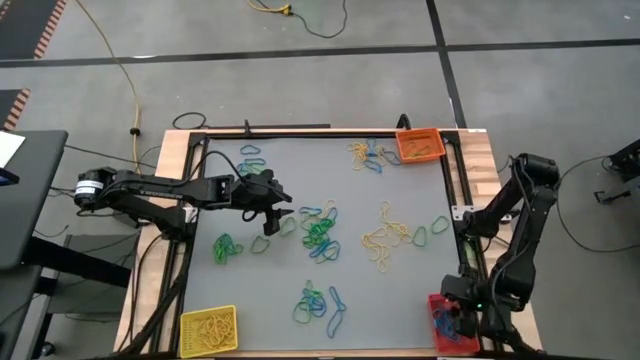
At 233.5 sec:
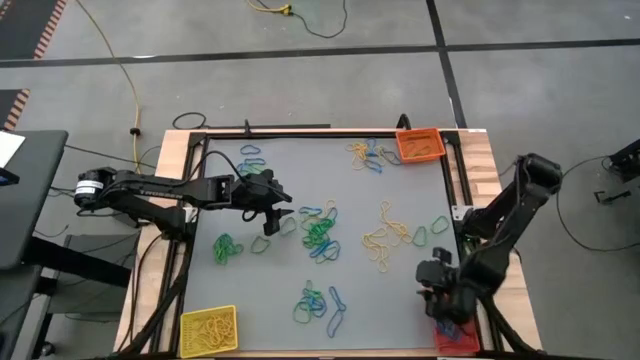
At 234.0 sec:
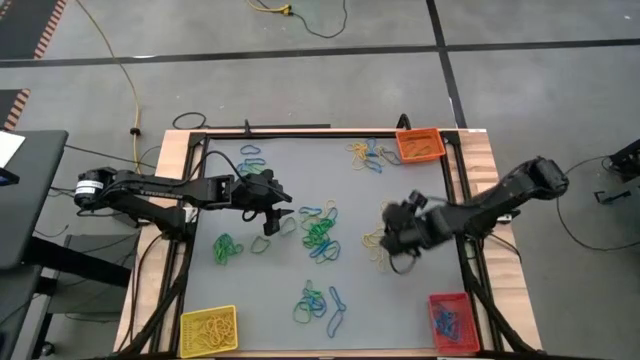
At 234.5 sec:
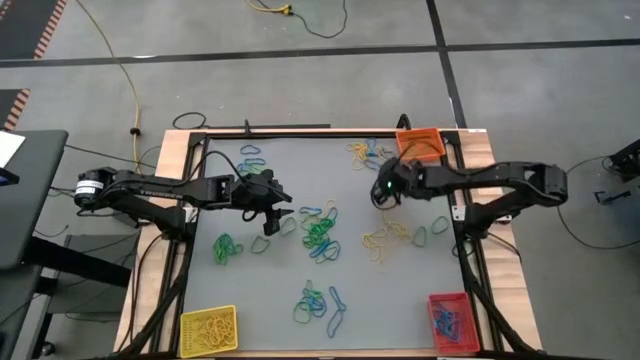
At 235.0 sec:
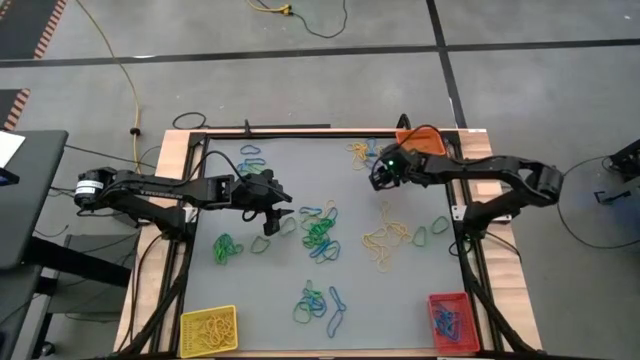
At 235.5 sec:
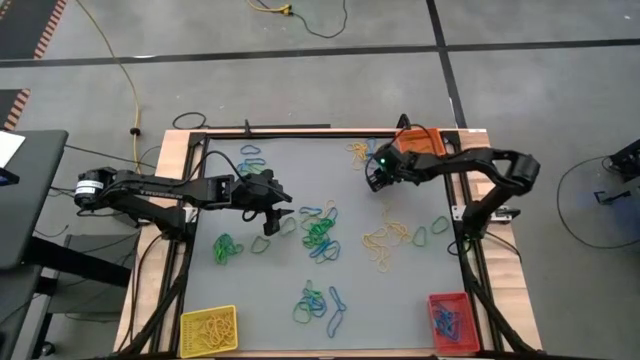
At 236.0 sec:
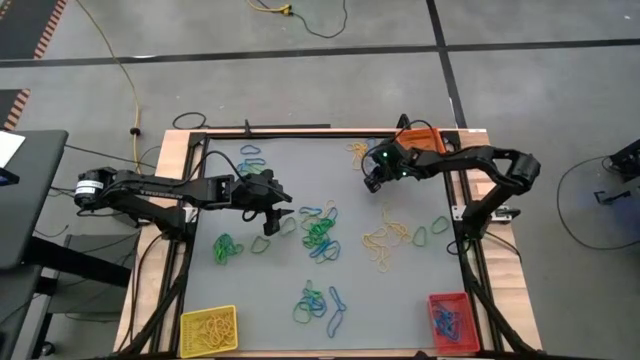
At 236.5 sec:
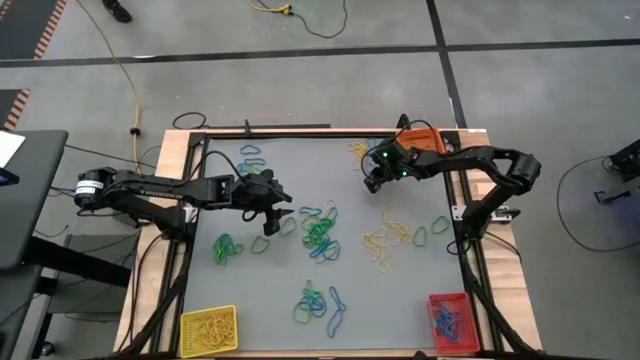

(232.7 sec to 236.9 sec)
Task: Sort rubber bands into baskets
Put the blue rubber band into the red bin

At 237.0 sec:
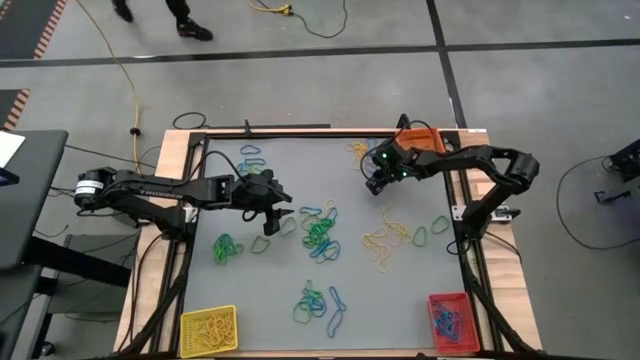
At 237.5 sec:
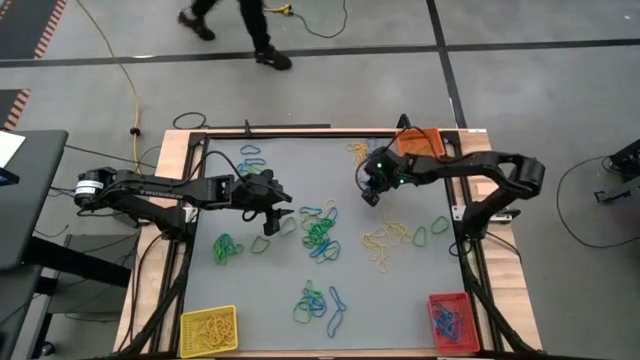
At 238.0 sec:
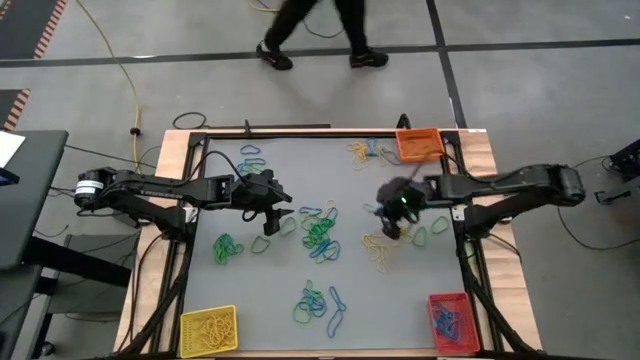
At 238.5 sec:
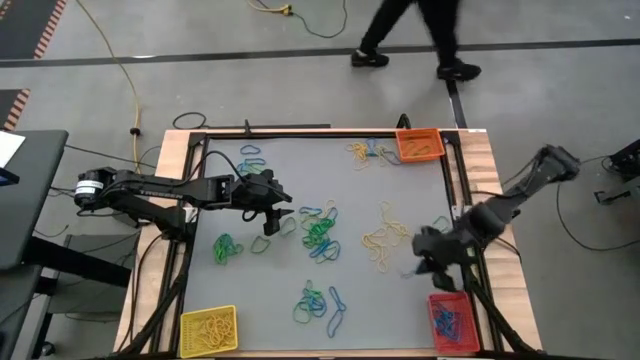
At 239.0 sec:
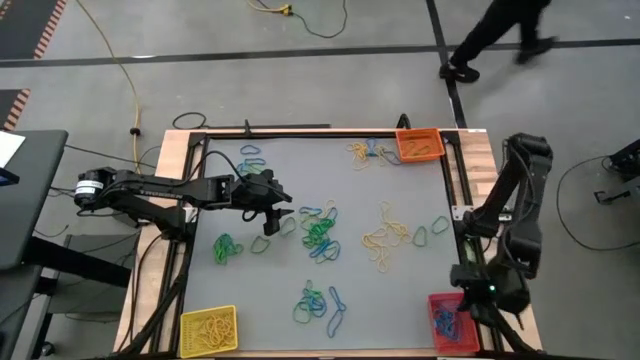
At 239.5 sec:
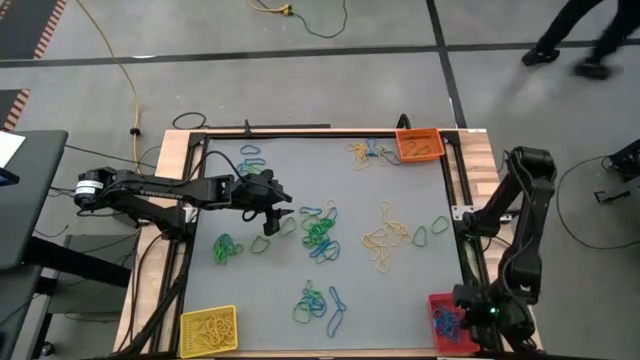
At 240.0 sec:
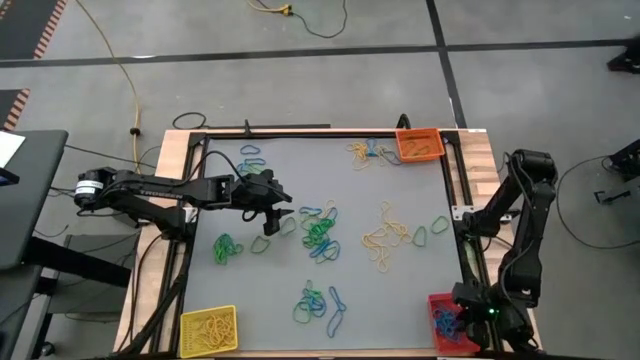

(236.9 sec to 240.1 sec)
Put the blue rubber band into the red bin

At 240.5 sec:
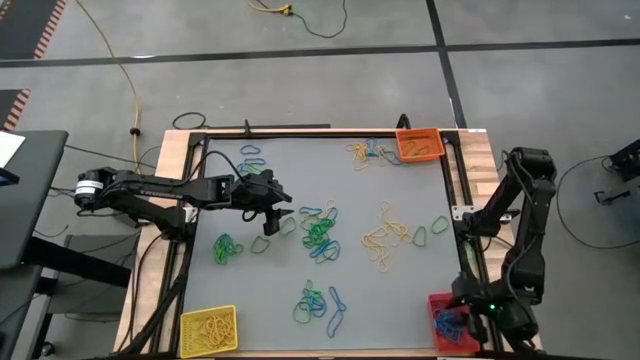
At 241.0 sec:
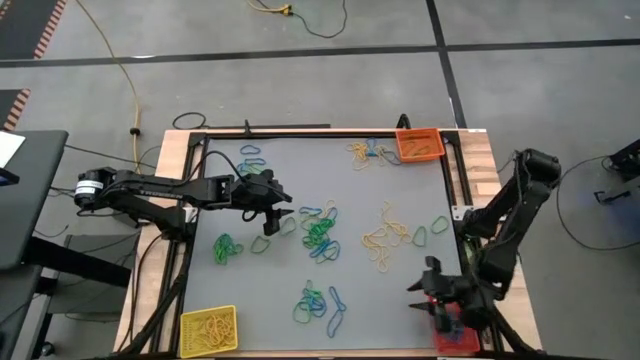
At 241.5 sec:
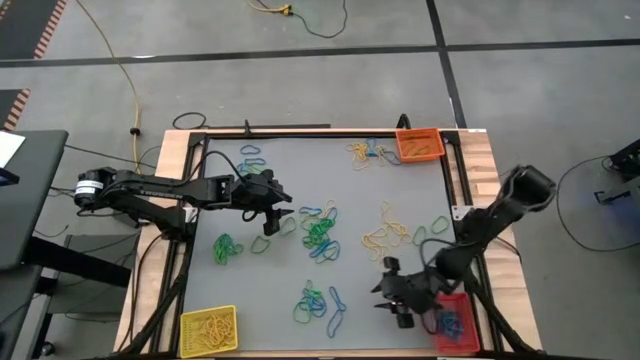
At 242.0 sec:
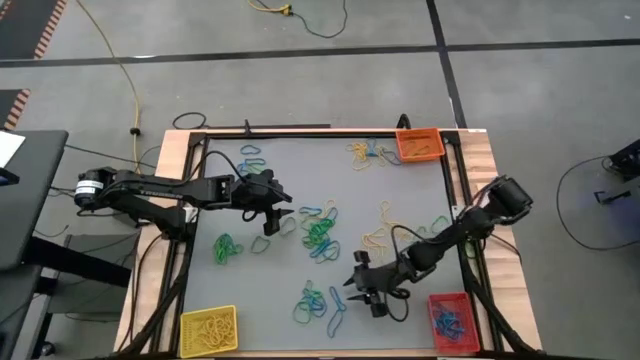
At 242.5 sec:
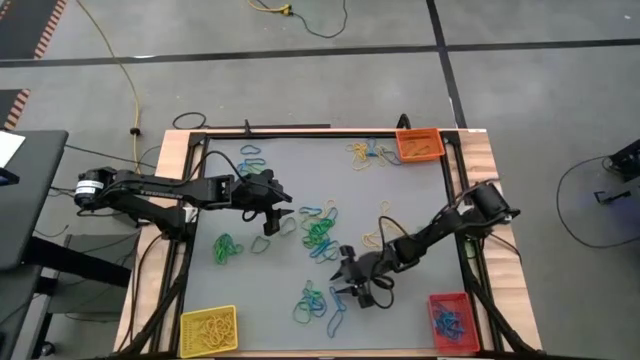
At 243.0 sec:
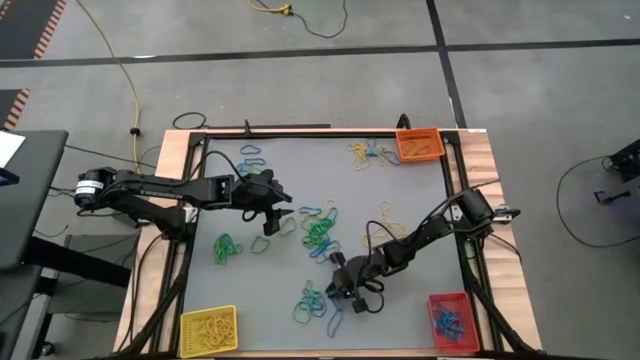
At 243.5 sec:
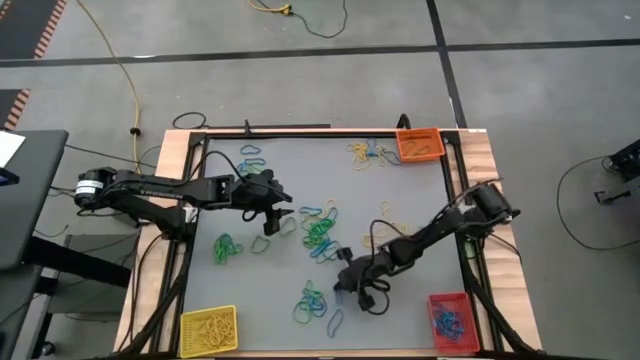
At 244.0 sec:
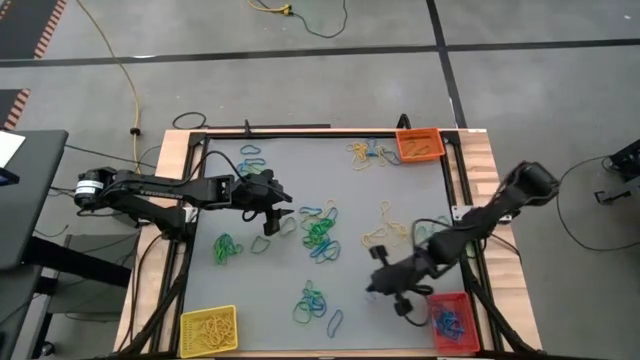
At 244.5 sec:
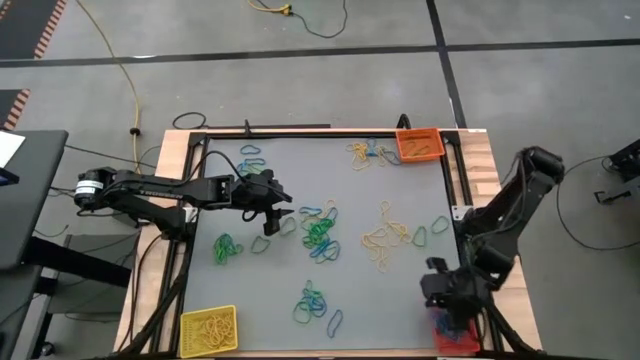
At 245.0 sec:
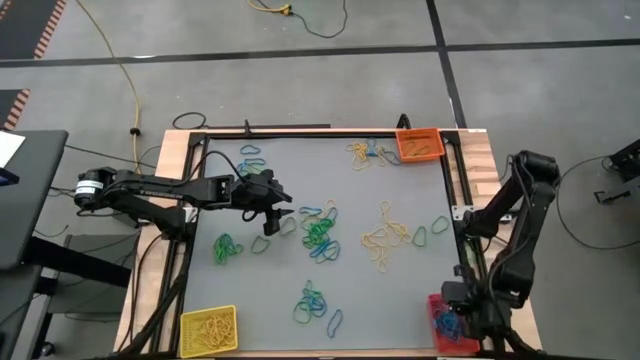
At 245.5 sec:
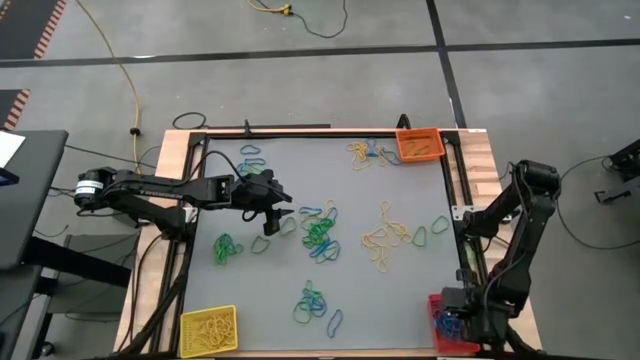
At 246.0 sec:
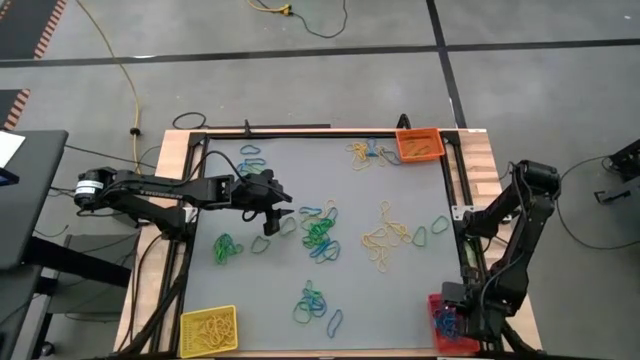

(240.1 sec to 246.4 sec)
Put the blue rubber band into the red bin

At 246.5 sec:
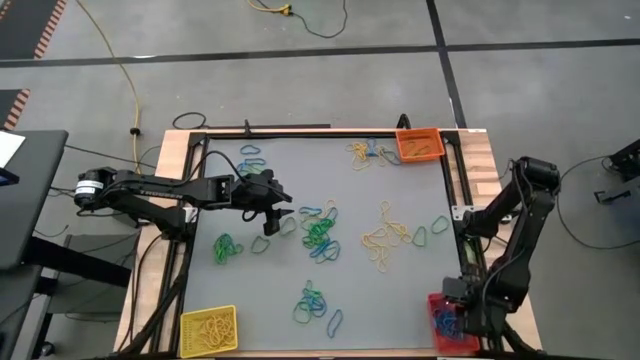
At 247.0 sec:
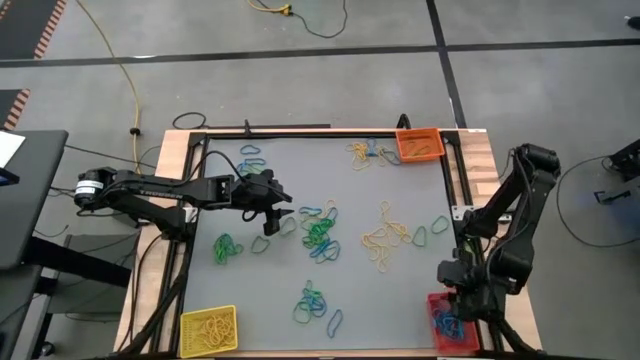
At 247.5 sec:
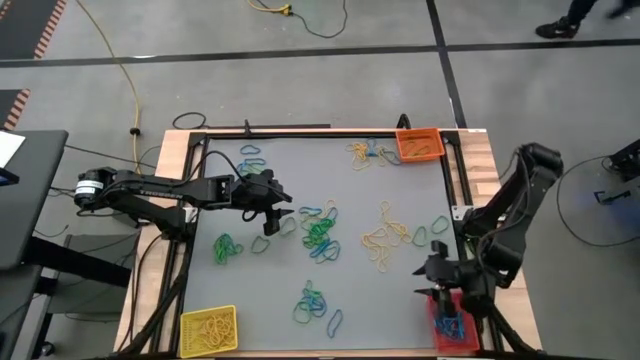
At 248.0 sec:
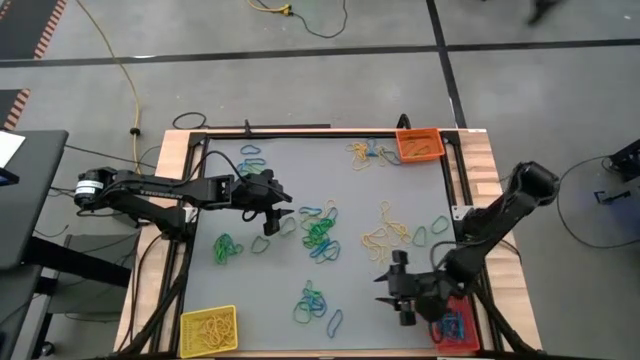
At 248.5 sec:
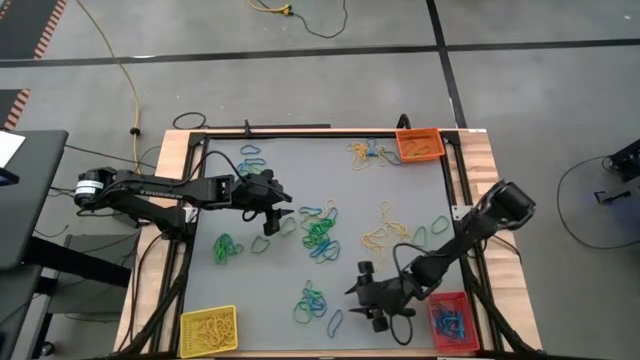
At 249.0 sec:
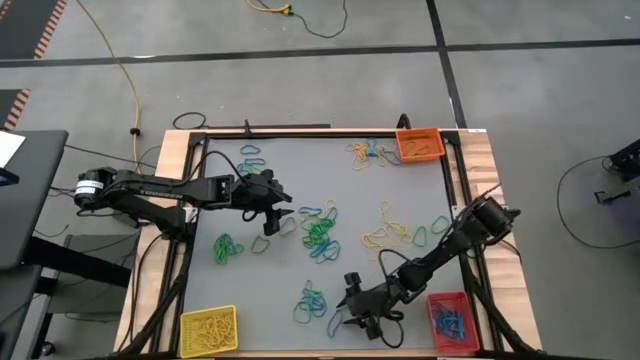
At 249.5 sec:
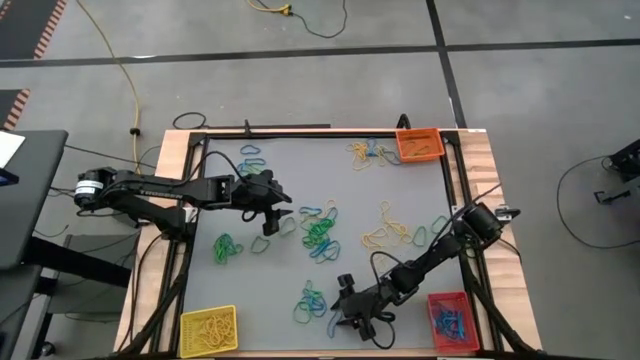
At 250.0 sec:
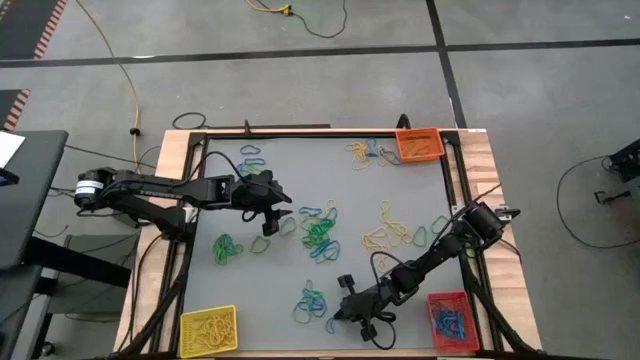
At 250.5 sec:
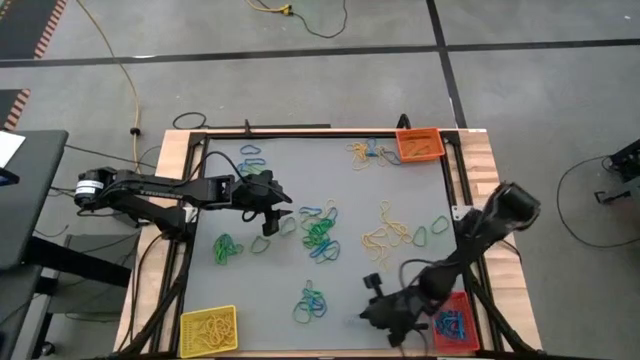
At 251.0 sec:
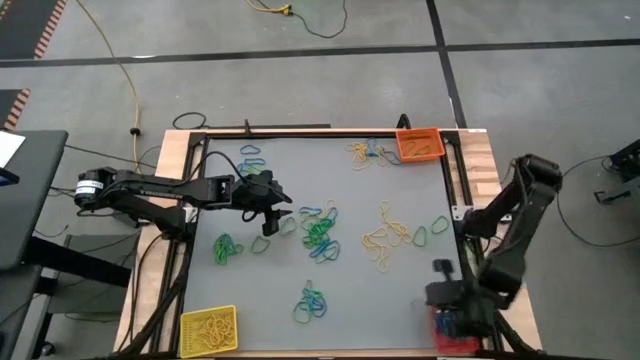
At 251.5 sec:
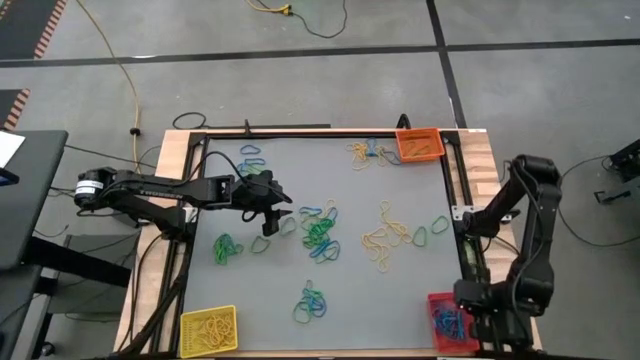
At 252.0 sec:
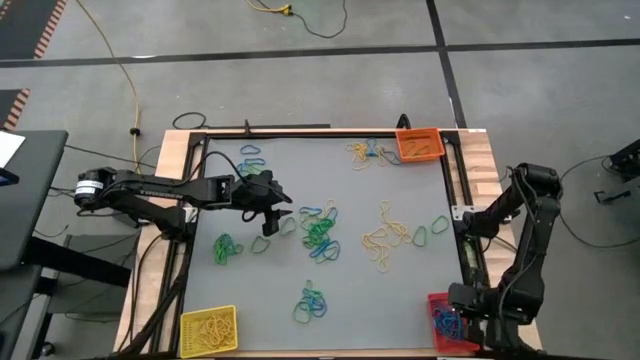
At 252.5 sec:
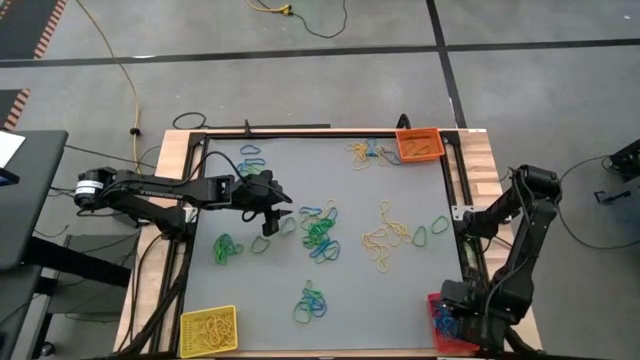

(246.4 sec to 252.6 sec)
Put the blue rubber band into the red bin

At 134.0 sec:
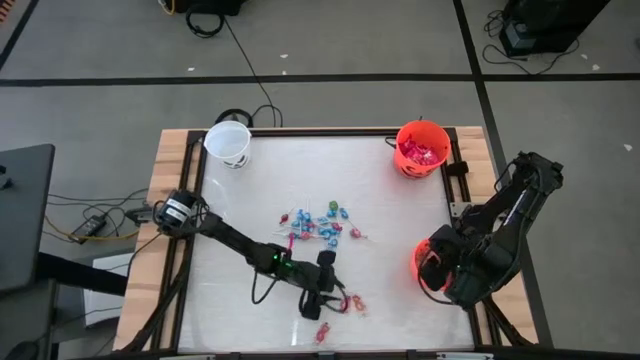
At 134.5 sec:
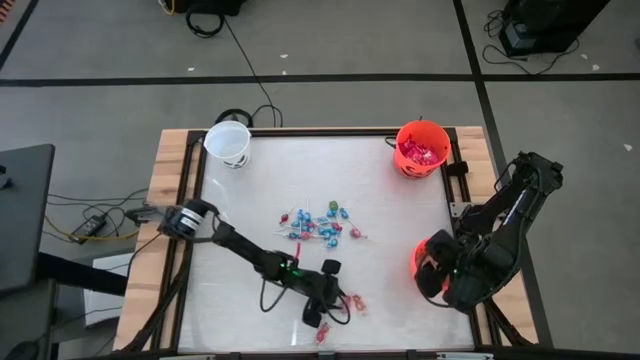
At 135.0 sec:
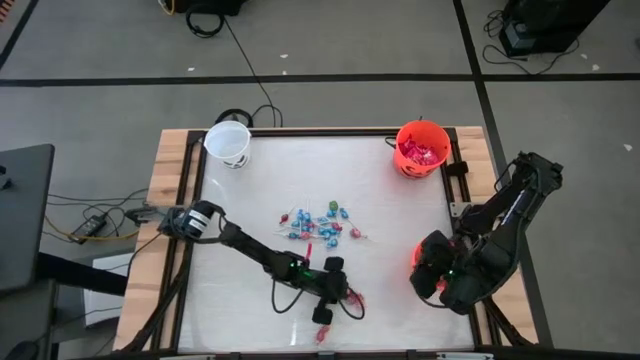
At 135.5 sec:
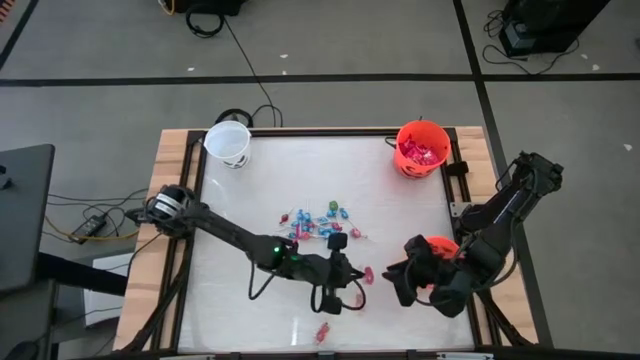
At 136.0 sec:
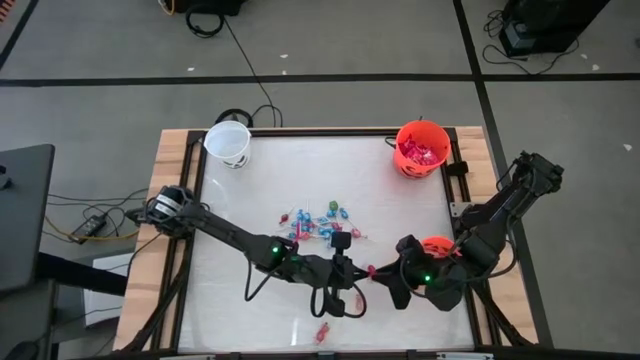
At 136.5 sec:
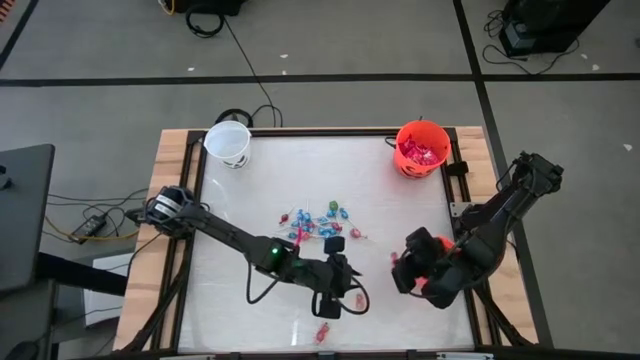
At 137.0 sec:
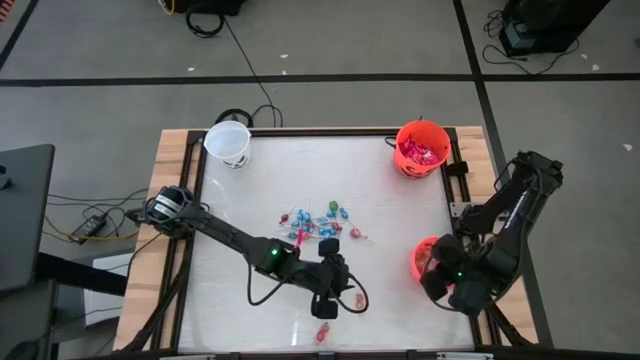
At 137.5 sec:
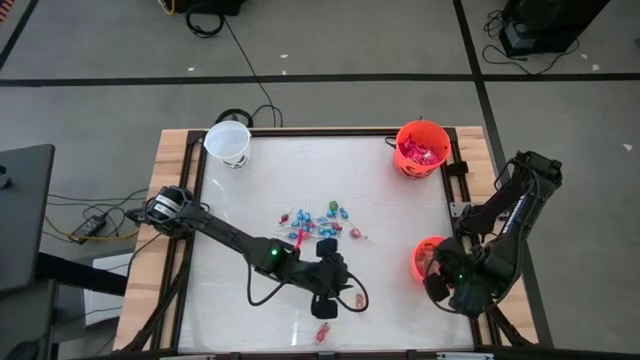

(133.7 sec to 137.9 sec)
Task: Sort candy by brand, put in halloween buckets
Put the red gummy into the bottom orange bucket
